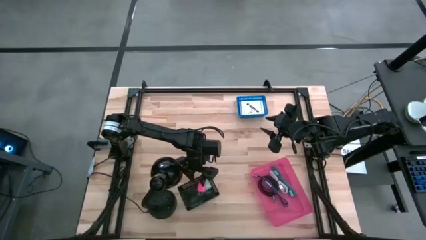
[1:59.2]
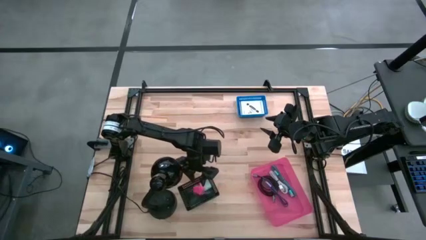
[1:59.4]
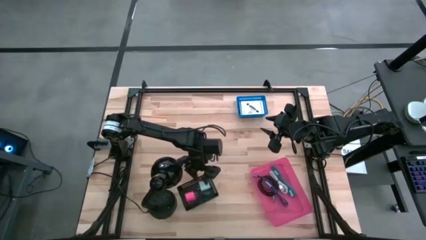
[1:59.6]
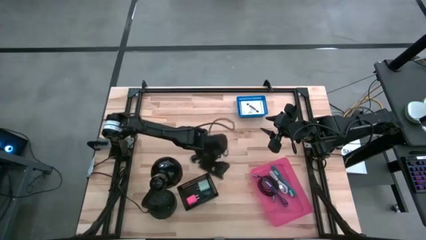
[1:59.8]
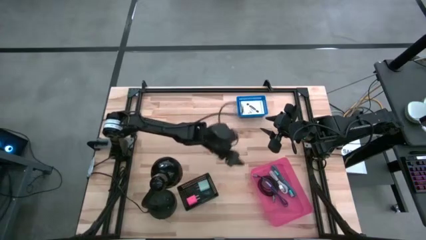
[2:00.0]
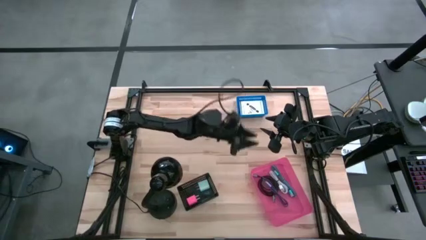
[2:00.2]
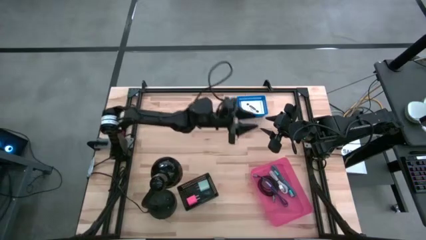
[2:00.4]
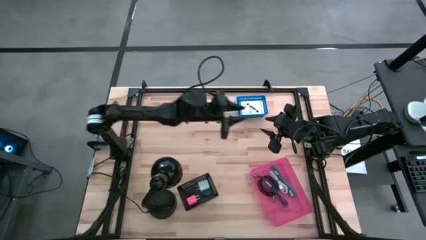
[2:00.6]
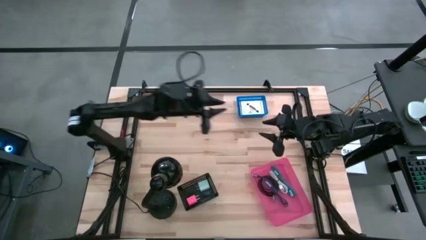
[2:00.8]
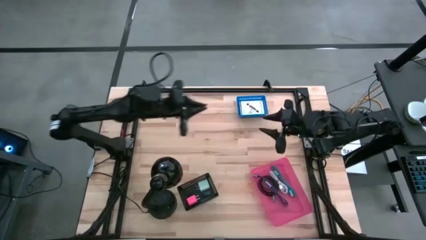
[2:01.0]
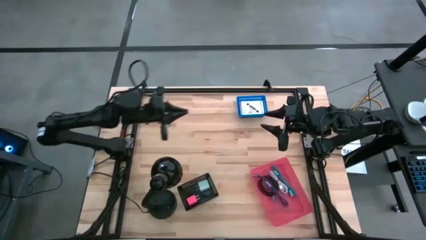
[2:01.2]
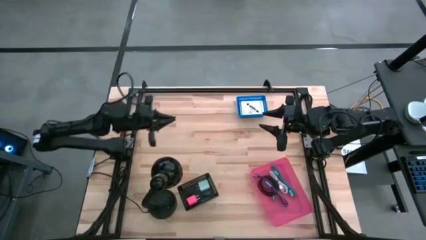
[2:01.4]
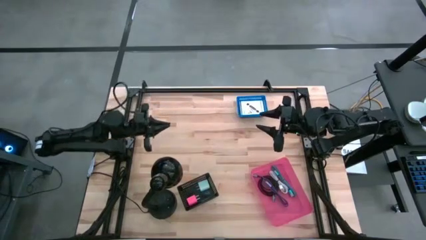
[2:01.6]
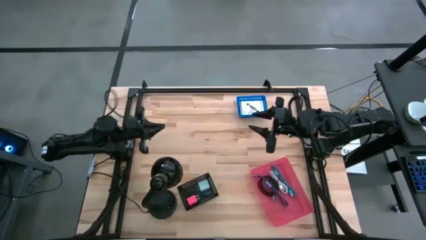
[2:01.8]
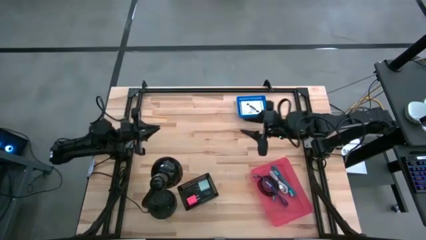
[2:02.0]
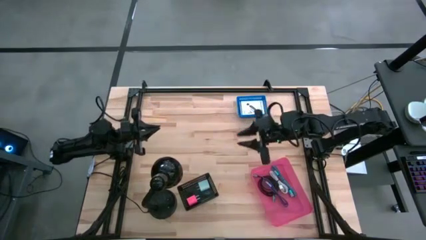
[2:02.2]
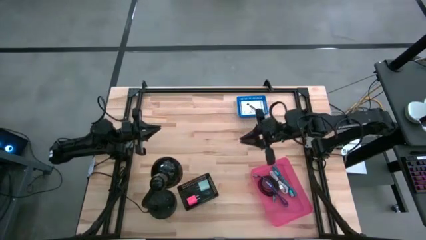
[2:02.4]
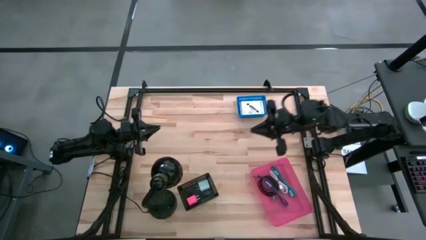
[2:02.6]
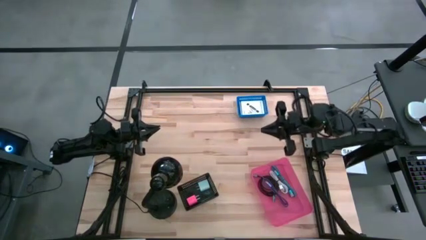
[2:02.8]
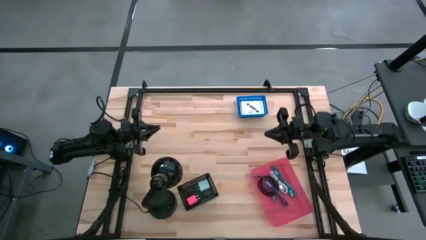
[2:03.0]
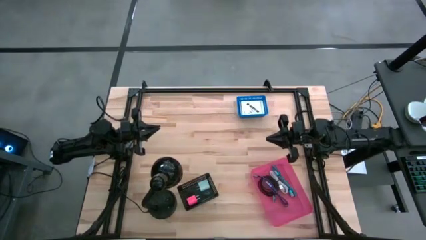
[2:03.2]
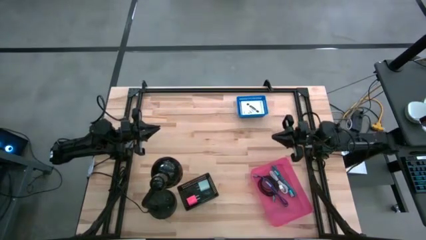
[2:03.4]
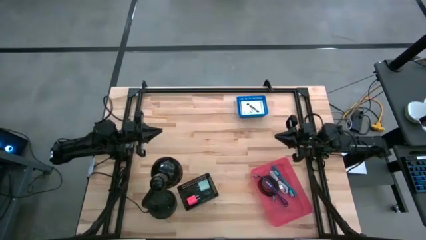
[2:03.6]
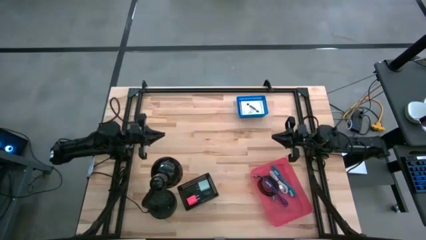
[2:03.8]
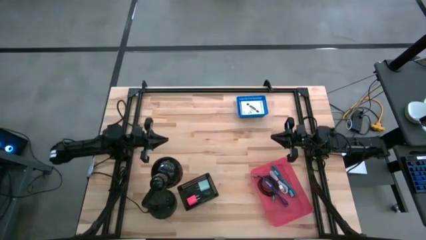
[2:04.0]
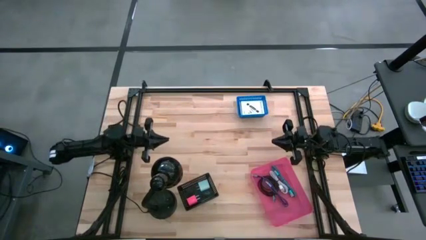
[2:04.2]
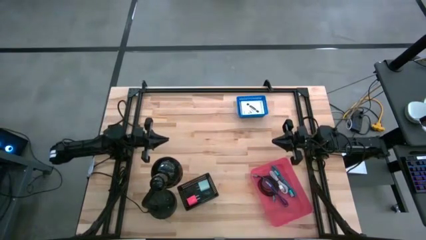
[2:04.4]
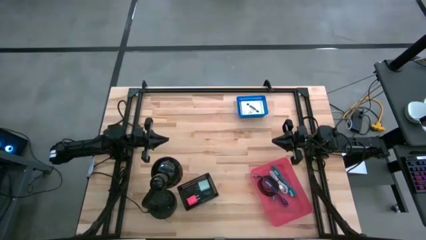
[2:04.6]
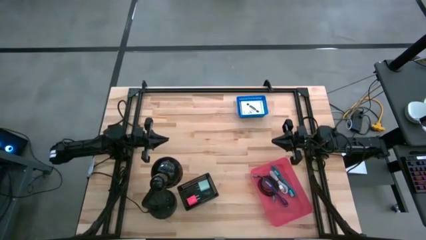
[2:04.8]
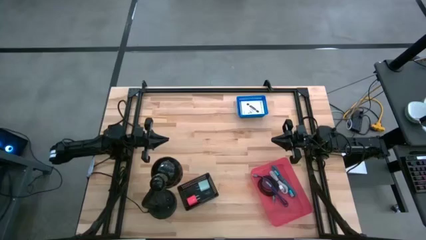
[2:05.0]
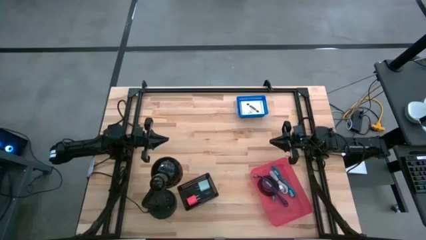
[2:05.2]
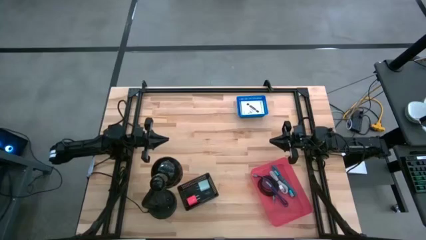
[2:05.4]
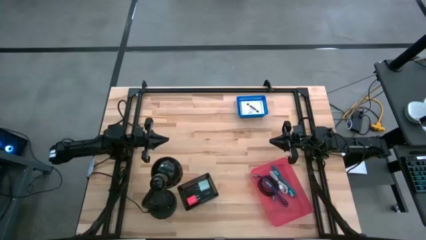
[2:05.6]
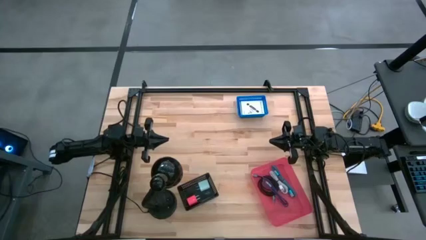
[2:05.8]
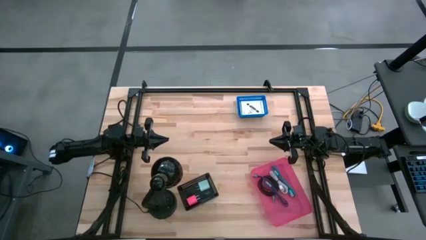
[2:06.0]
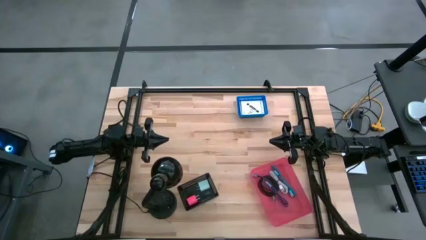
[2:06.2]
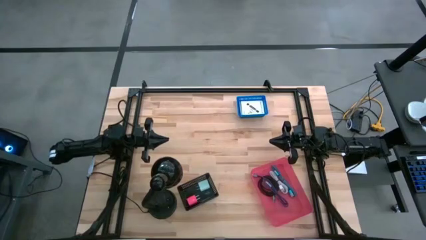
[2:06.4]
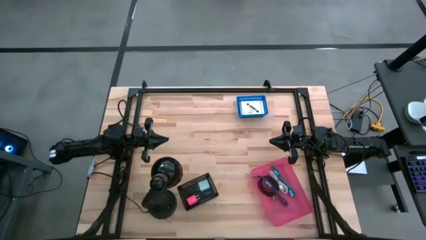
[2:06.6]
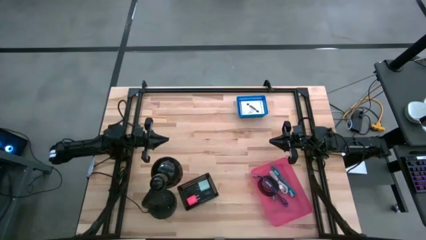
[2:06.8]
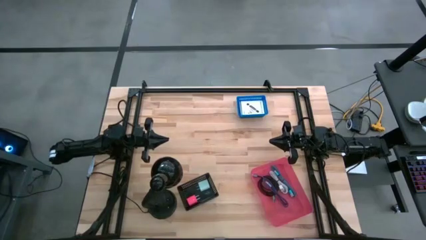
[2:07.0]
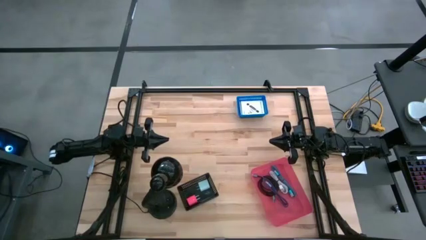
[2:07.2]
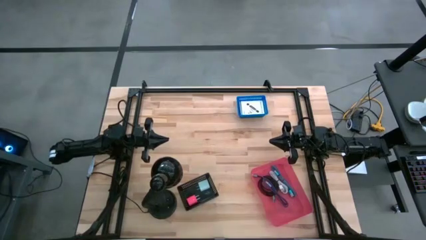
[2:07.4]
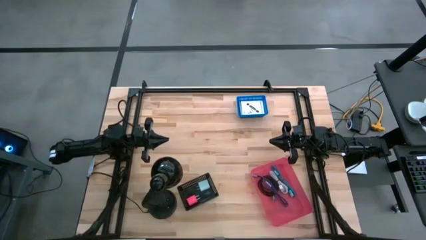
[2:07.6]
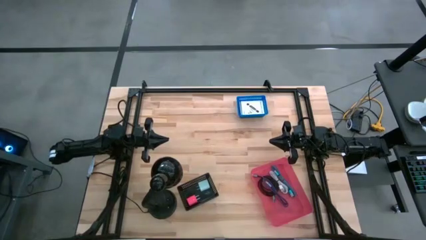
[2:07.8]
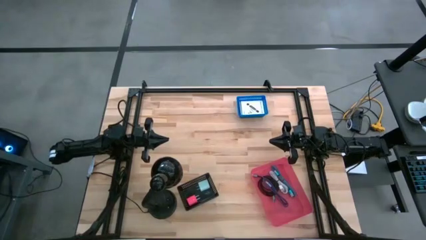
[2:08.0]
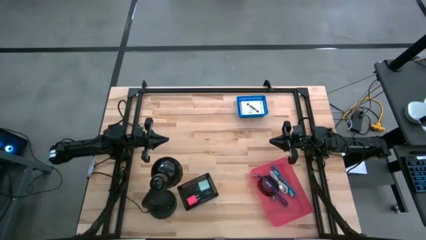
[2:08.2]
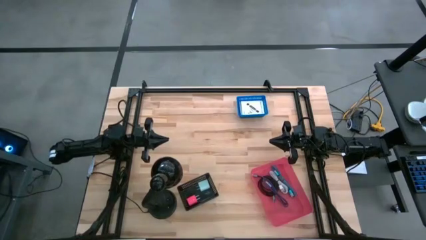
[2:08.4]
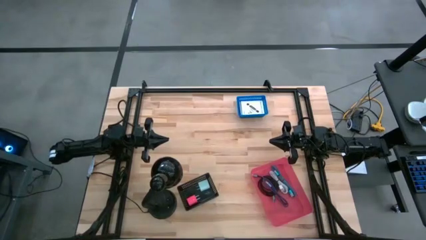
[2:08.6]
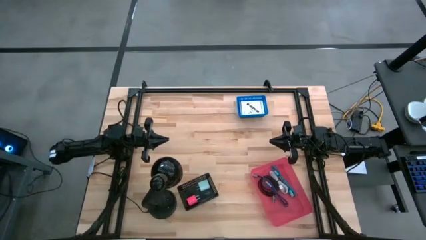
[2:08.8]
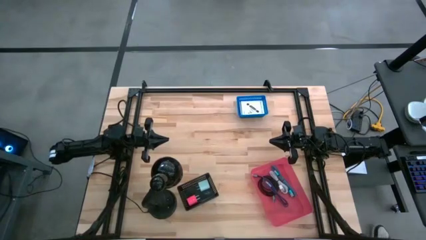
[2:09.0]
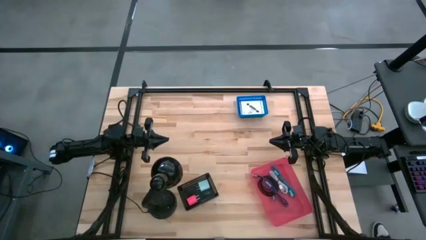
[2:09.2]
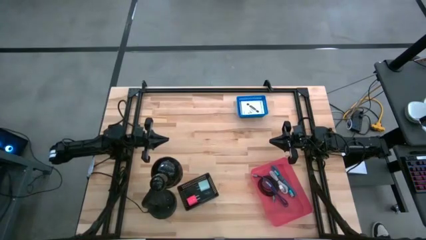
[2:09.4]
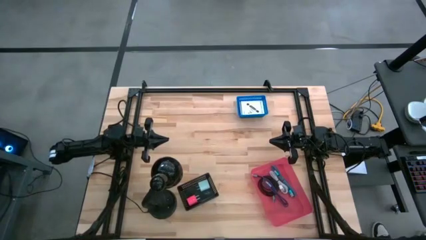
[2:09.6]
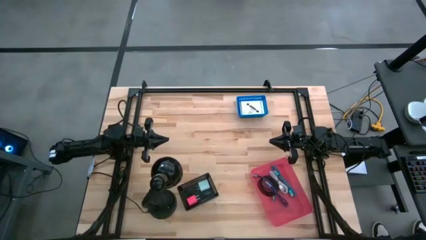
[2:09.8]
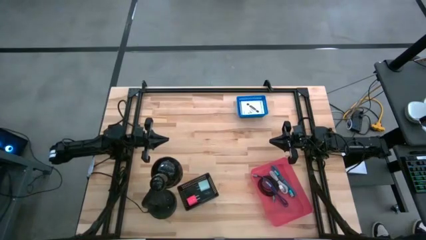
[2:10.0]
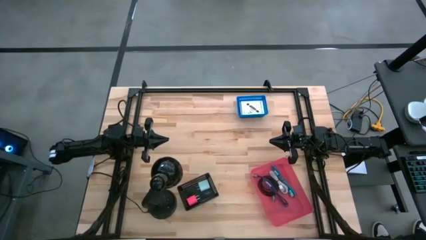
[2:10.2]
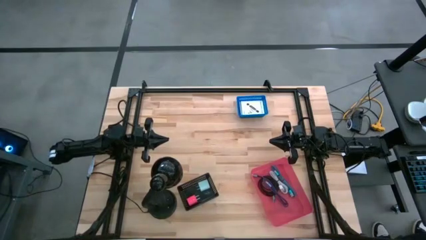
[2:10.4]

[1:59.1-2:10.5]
Task: Pick and place items into bin
Return to Home Position

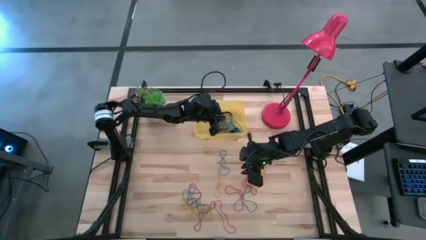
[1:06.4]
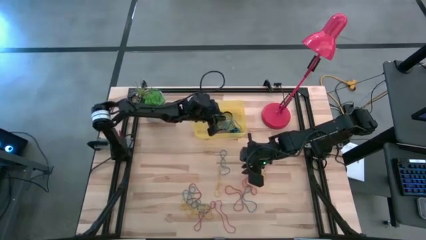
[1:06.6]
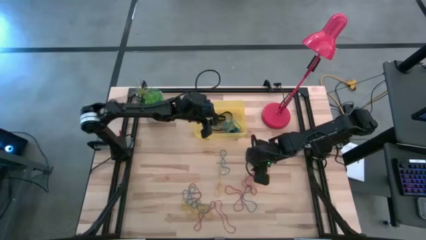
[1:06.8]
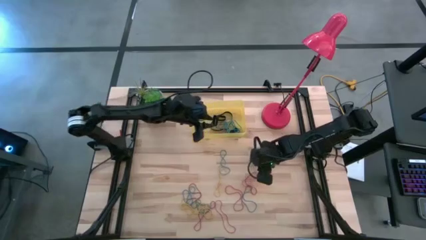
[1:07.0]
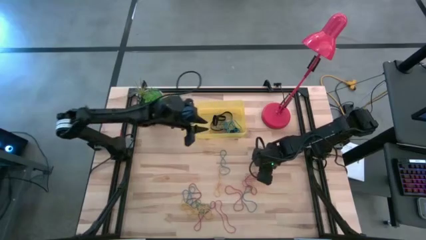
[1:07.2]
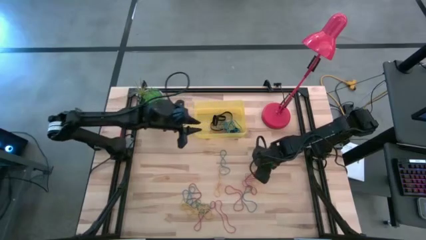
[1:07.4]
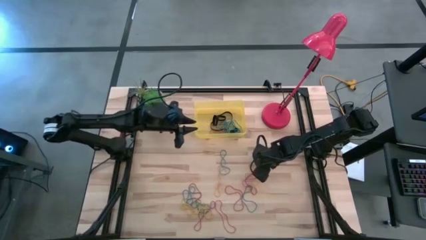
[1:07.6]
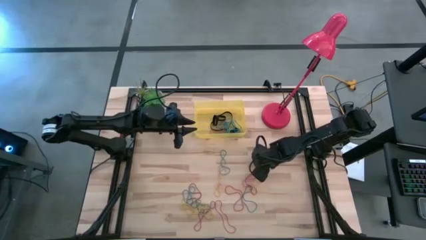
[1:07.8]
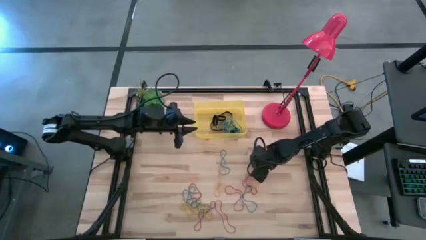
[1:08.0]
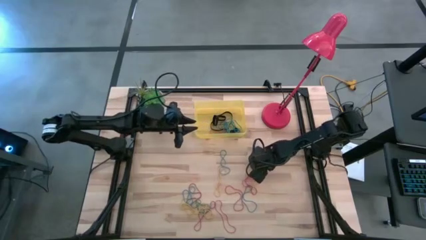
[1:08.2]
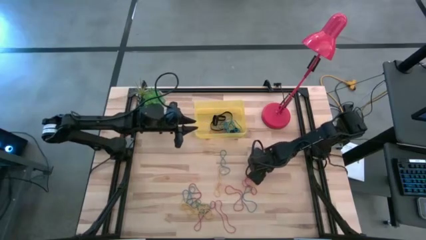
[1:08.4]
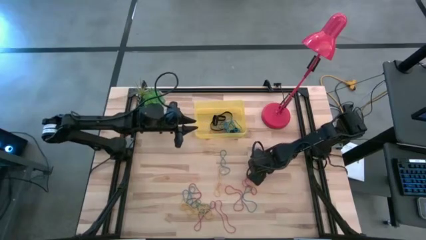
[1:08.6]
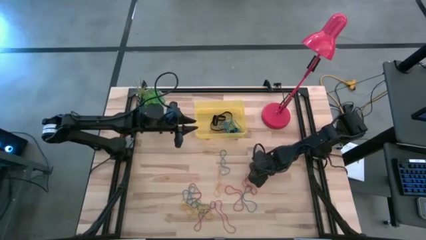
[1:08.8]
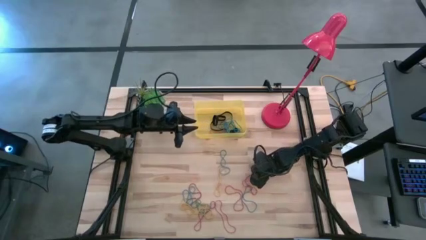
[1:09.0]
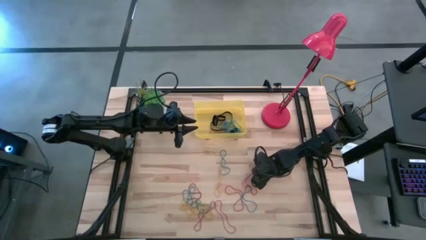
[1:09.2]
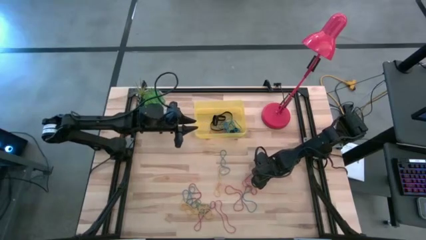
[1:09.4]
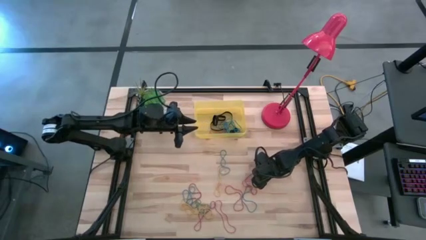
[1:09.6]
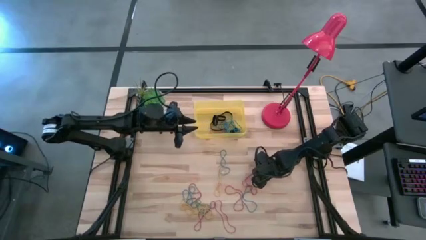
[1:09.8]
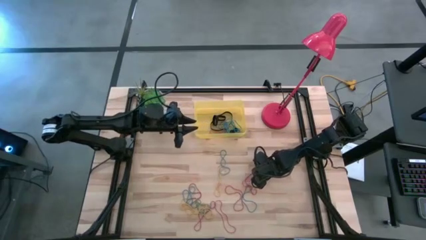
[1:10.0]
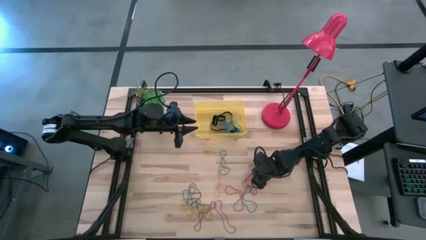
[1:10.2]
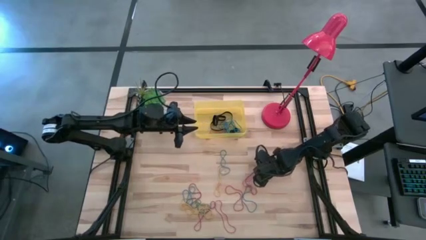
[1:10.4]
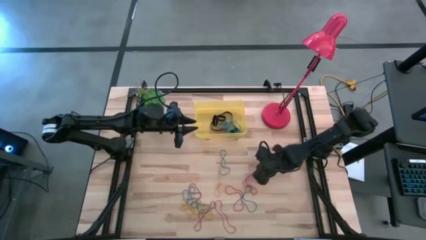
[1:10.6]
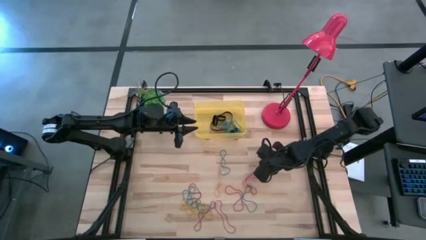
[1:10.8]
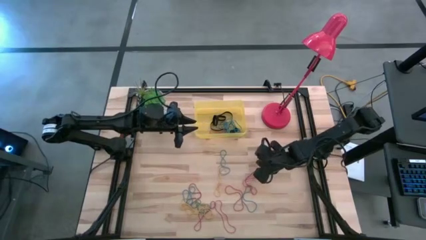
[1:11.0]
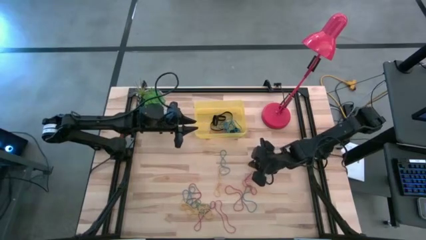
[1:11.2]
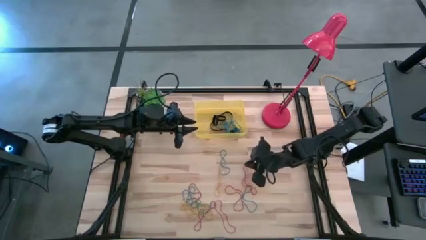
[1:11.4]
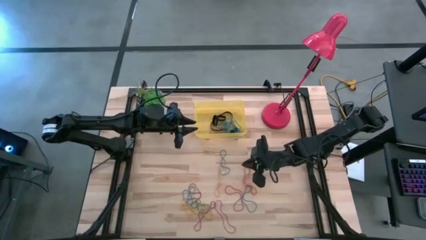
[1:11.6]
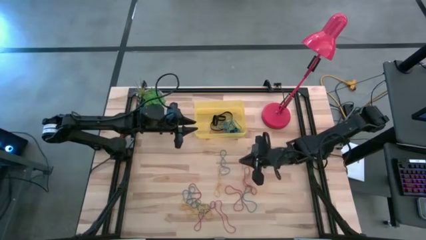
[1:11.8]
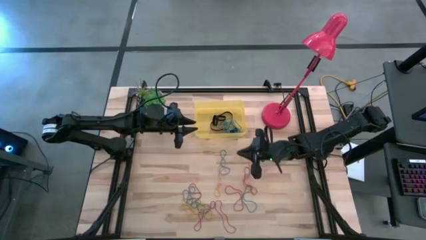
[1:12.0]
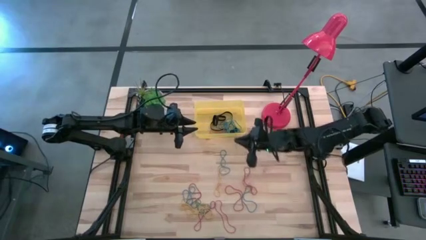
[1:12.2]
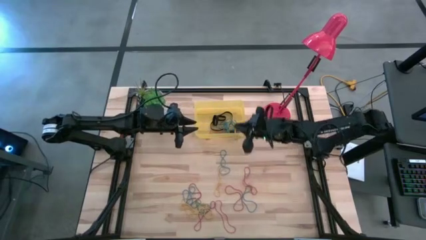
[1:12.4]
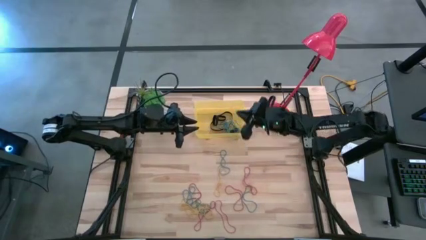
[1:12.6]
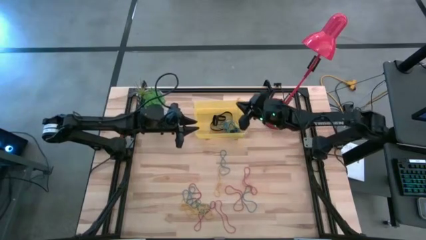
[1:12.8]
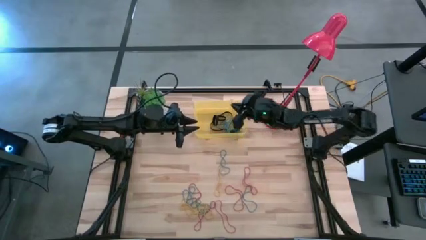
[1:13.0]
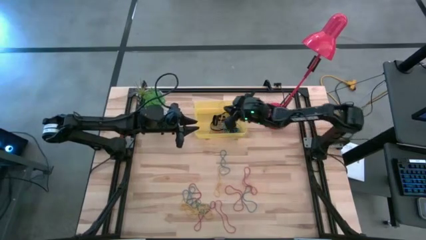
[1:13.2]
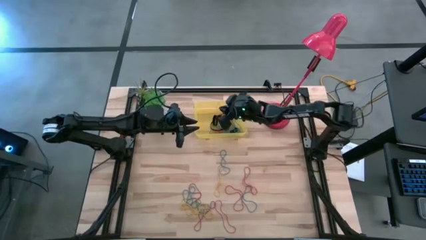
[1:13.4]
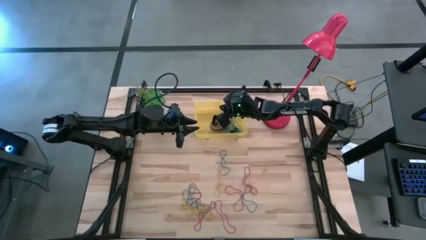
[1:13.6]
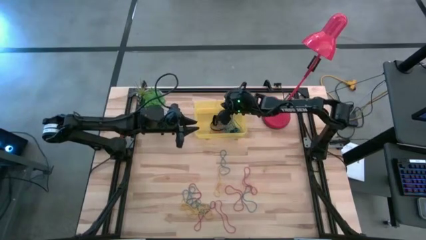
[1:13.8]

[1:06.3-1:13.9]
Task: Pick and place rubber bands into bin
Put the yellow rubber band into the yellow bin
